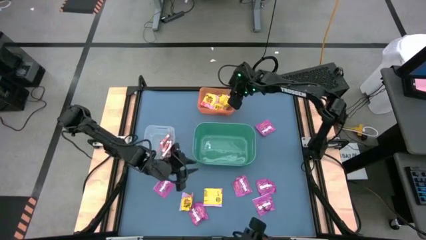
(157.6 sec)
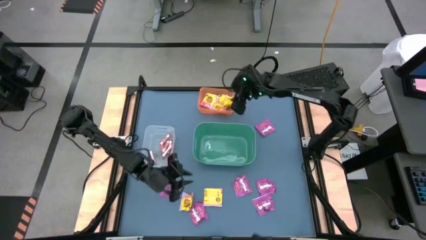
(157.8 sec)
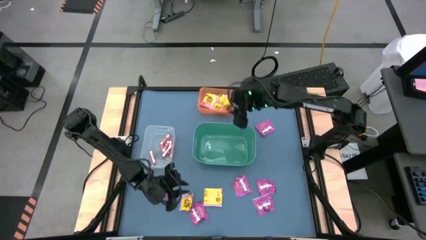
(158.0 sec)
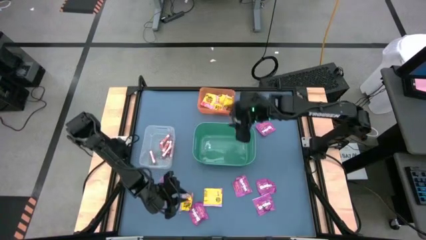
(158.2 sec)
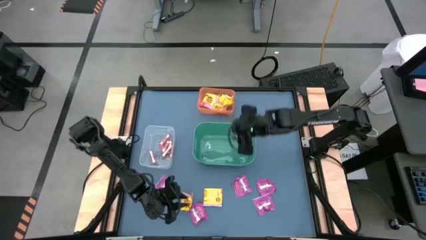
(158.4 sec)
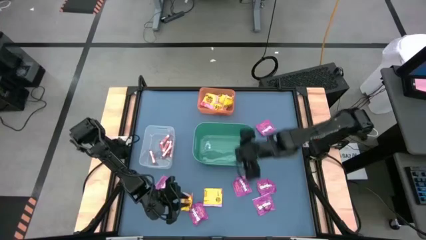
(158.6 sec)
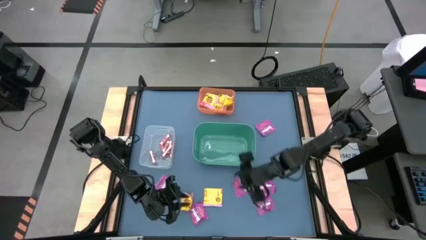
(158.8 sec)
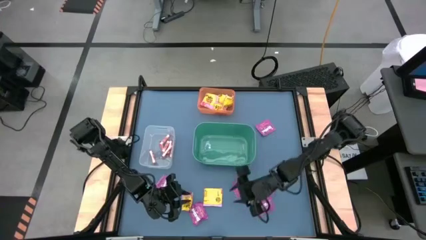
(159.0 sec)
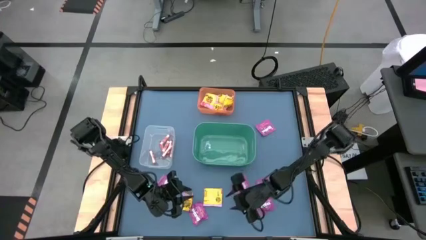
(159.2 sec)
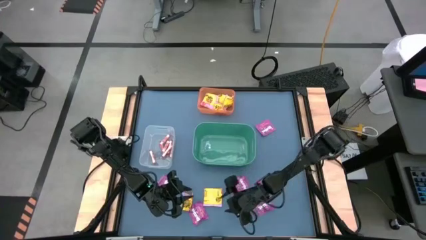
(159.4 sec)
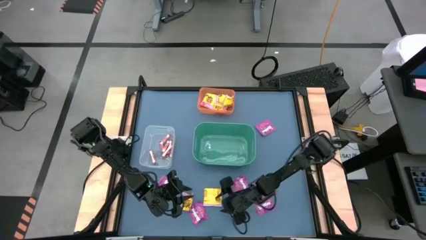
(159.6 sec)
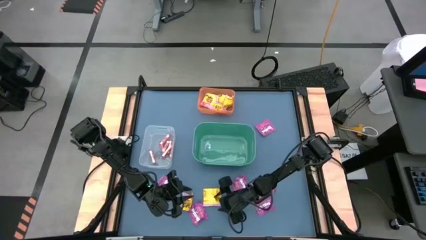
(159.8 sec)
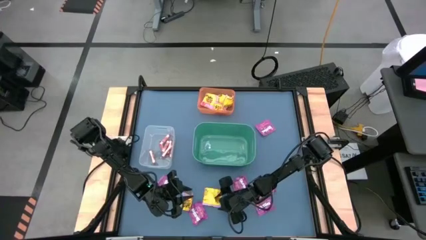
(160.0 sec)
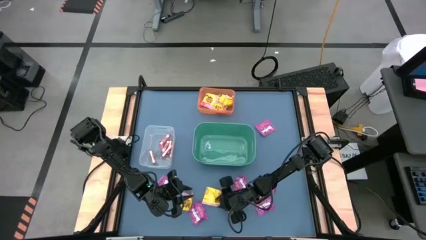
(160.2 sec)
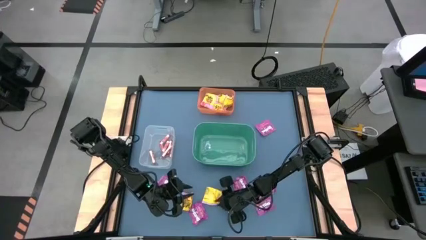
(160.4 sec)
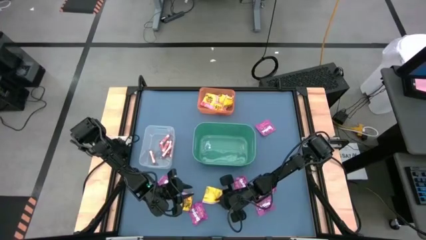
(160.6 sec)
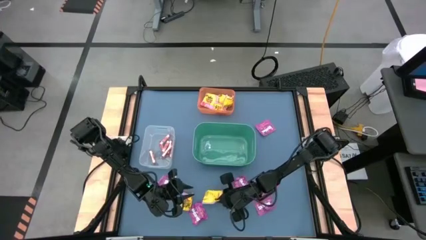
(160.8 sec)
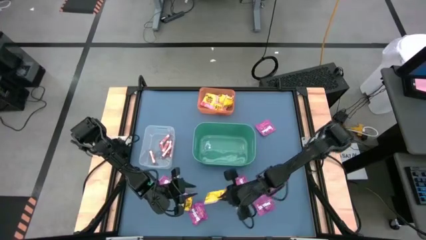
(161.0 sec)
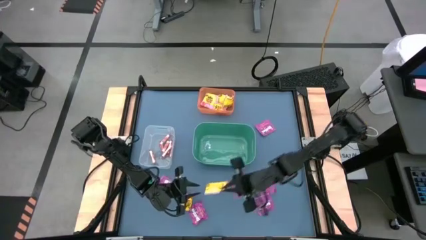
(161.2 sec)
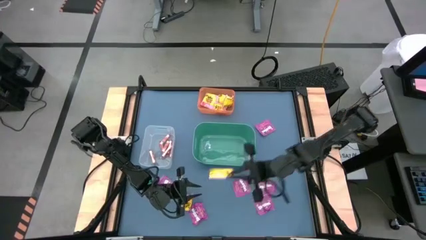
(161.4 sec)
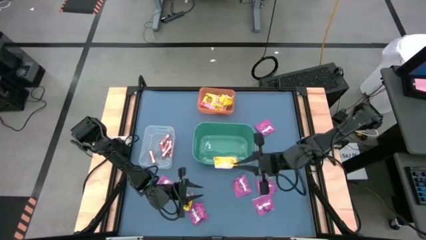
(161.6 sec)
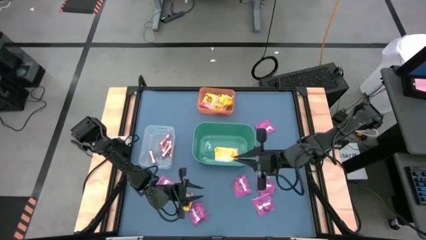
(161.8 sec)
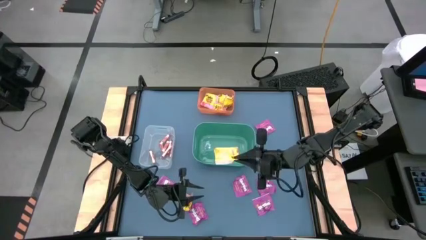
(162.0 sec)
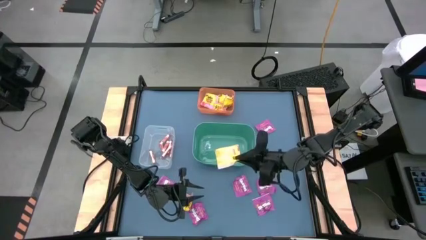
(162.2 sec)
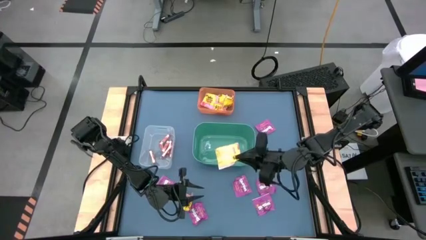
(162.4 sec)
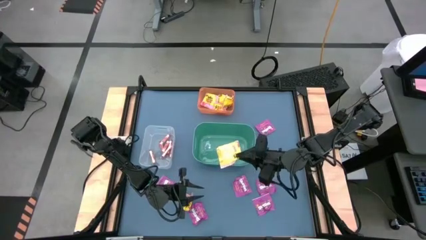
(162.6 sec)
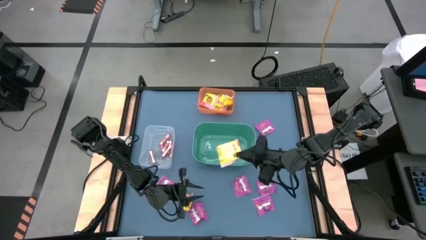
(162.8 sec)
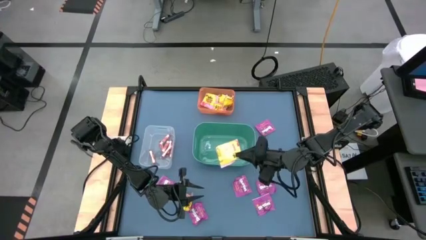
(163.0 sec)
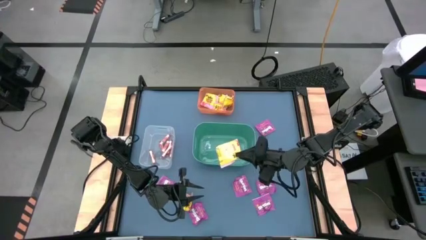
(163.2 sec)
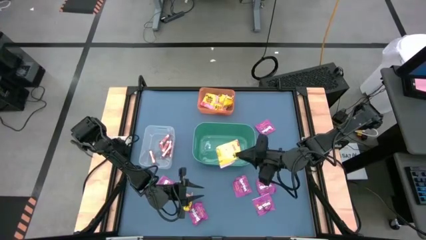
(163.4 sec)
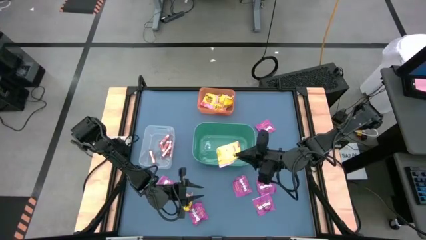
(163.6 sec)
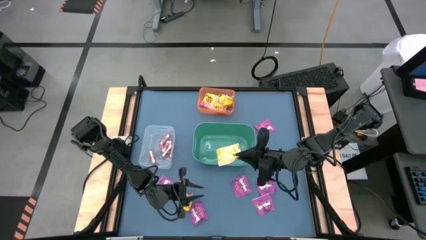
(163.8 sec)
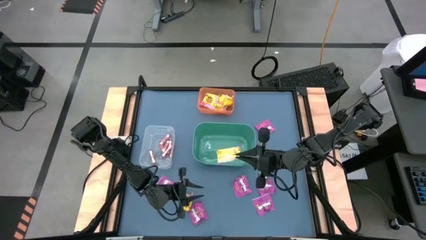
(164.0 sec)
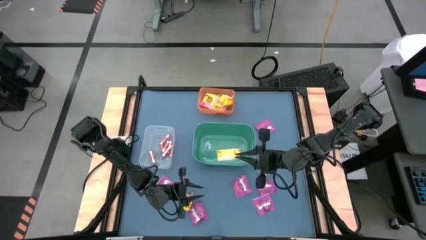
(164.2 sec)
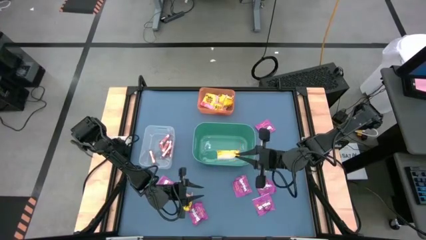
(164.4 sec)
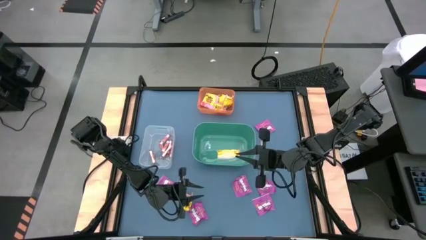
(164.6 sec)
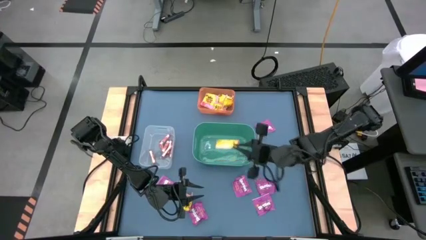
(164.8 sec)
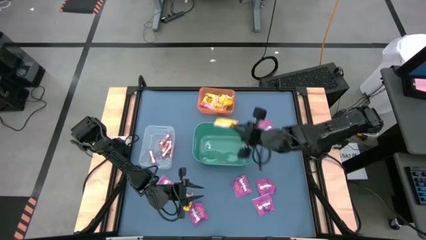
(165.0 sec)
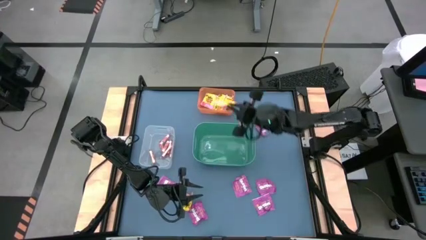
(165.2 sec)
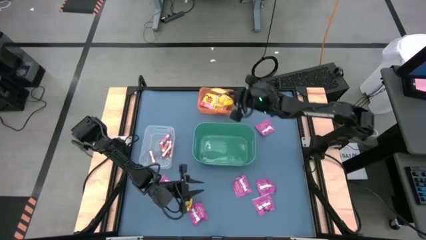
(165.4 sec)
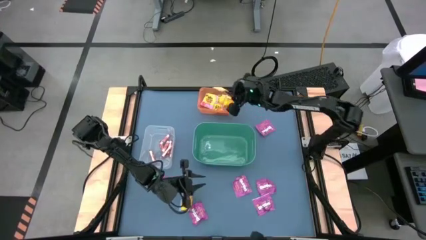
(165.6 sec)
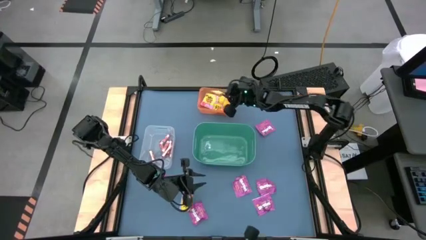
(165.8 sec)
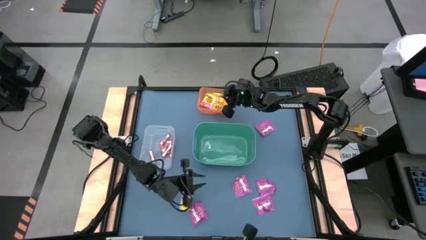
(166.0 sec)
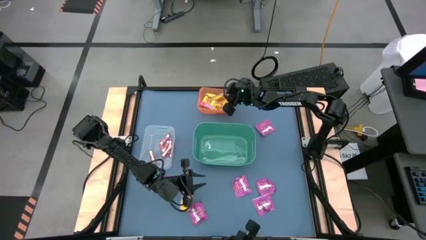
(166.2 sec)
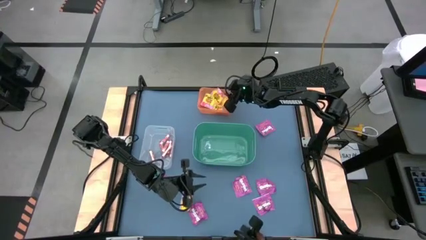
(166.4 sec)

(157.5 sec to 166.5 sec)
Task: Sort candy
Put the yellow candy into the orange bin

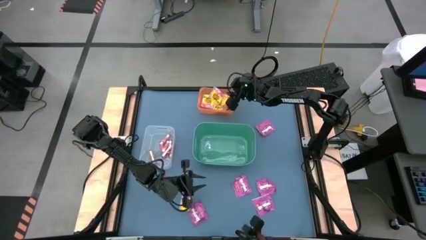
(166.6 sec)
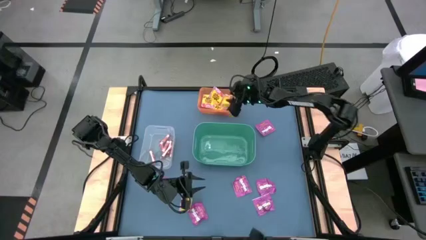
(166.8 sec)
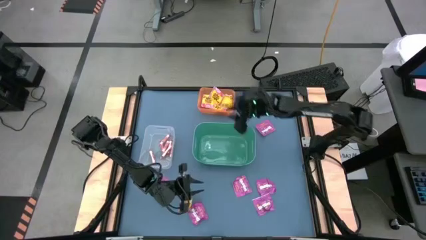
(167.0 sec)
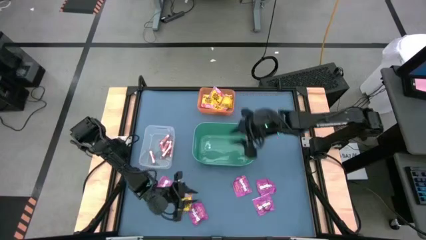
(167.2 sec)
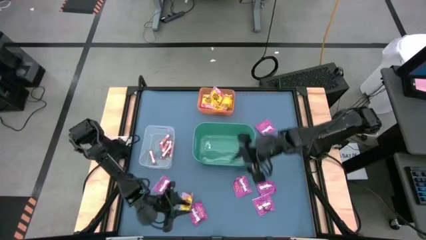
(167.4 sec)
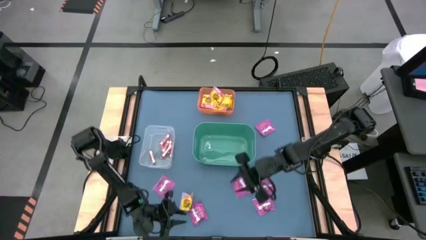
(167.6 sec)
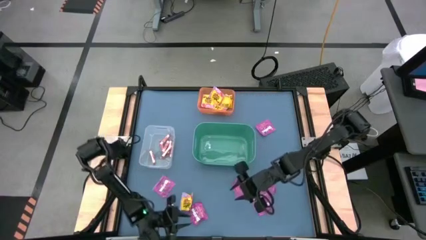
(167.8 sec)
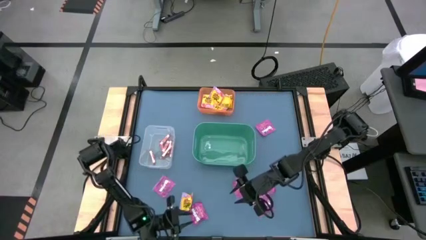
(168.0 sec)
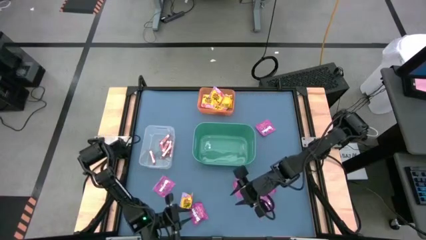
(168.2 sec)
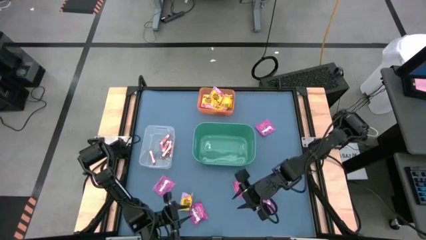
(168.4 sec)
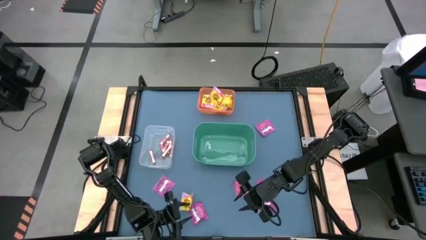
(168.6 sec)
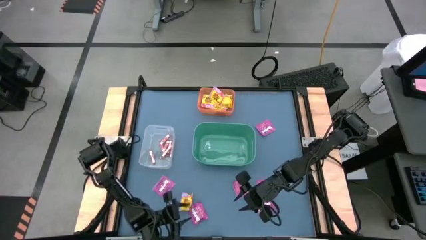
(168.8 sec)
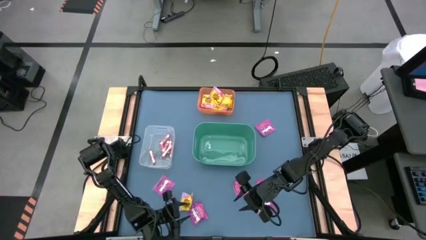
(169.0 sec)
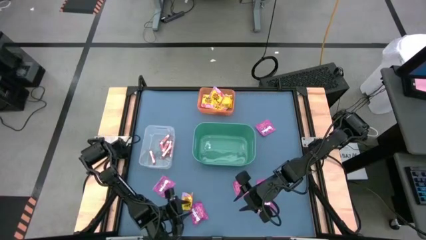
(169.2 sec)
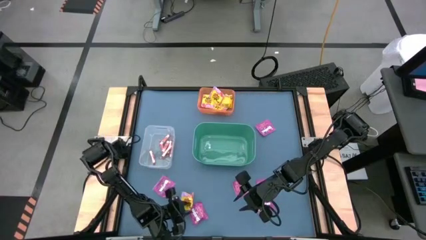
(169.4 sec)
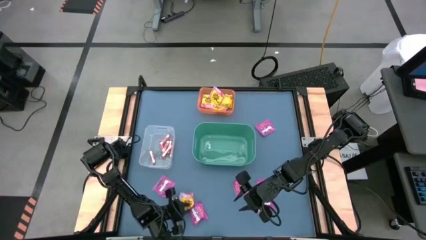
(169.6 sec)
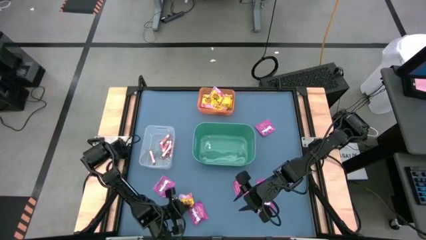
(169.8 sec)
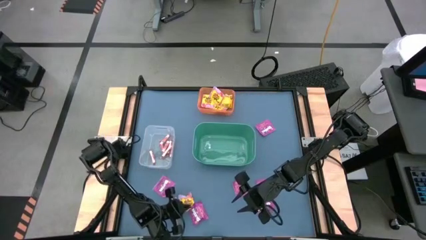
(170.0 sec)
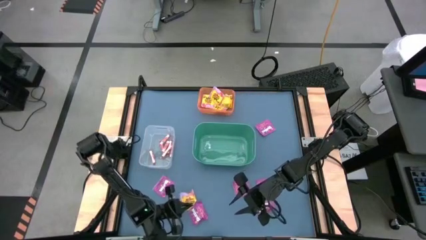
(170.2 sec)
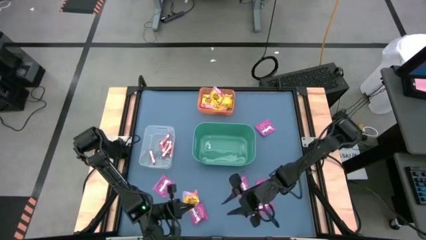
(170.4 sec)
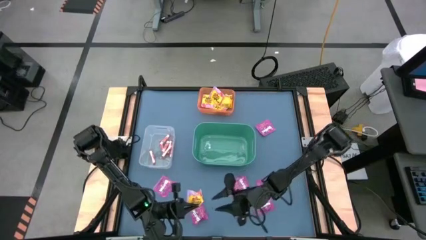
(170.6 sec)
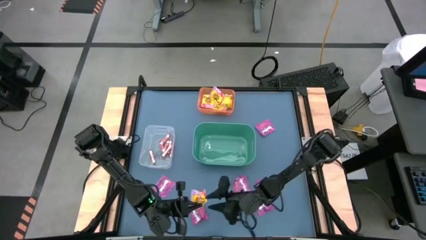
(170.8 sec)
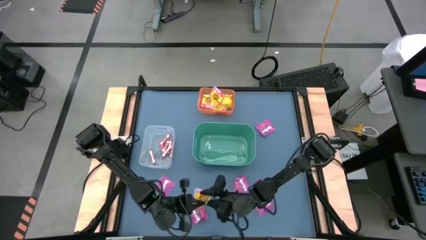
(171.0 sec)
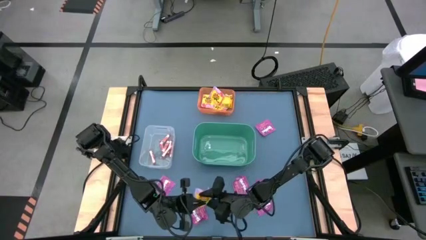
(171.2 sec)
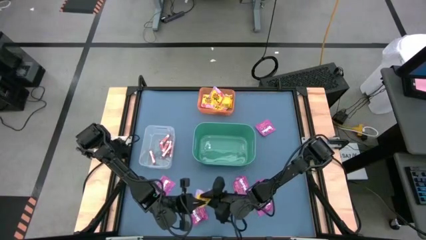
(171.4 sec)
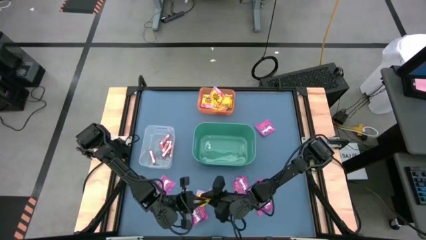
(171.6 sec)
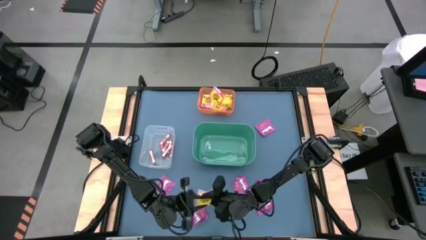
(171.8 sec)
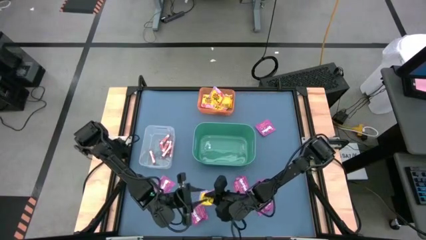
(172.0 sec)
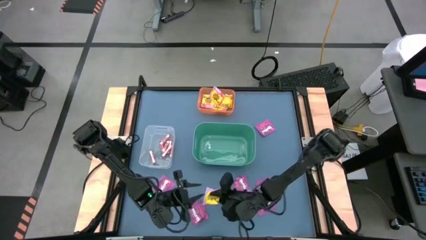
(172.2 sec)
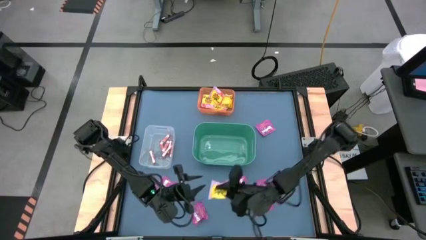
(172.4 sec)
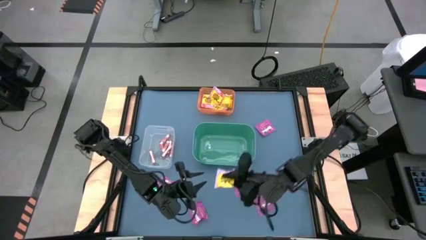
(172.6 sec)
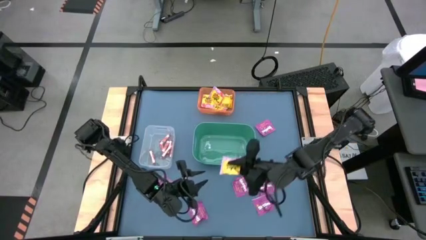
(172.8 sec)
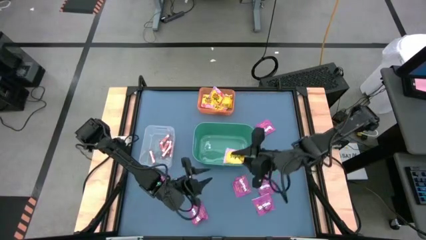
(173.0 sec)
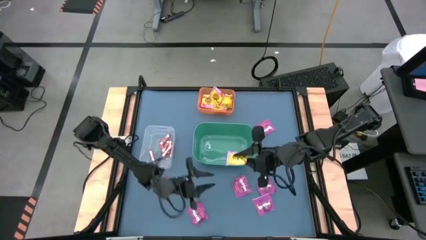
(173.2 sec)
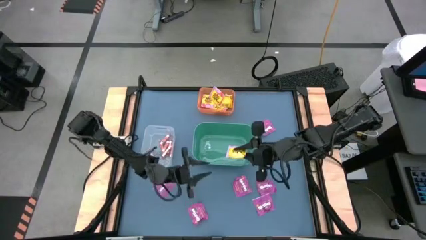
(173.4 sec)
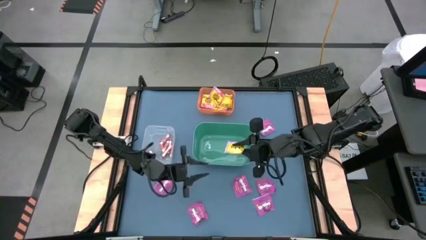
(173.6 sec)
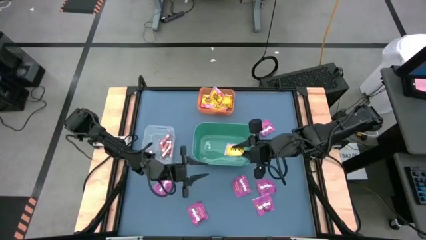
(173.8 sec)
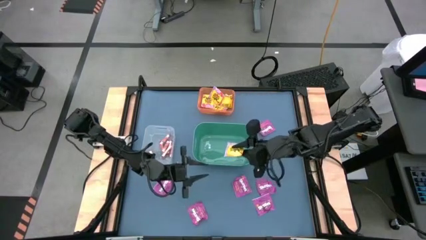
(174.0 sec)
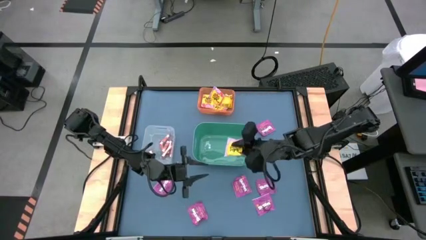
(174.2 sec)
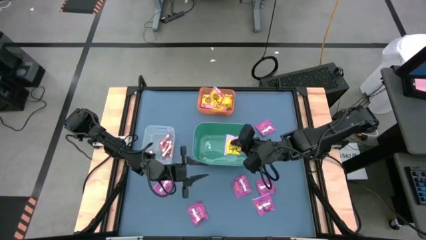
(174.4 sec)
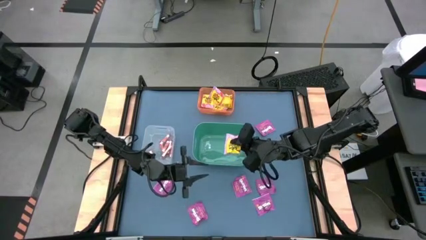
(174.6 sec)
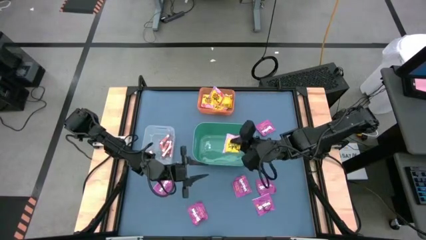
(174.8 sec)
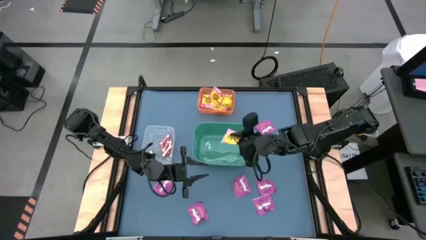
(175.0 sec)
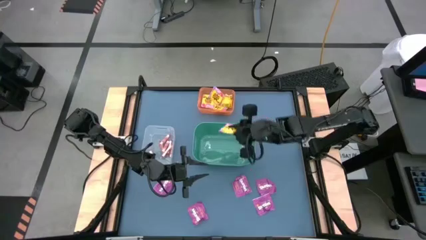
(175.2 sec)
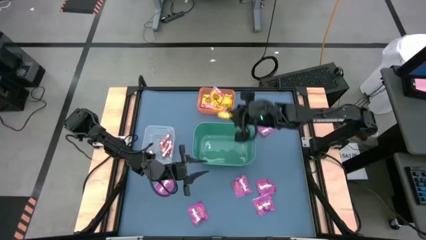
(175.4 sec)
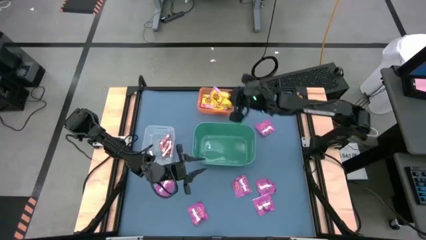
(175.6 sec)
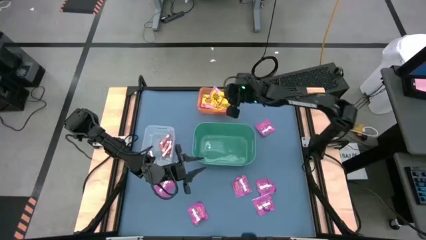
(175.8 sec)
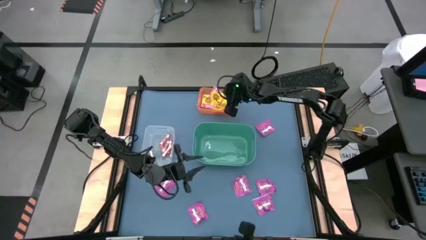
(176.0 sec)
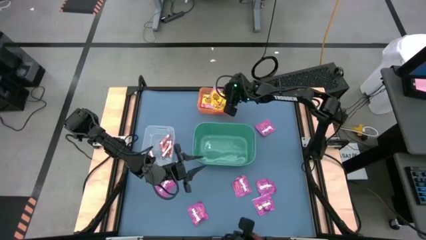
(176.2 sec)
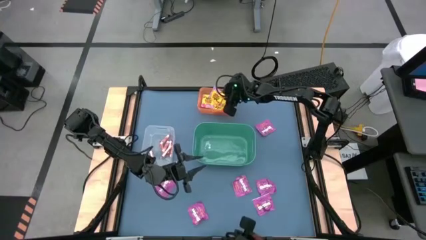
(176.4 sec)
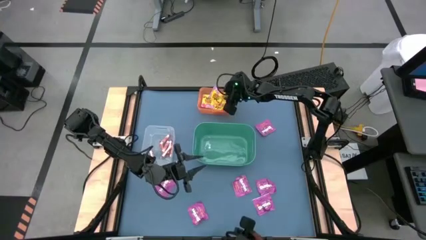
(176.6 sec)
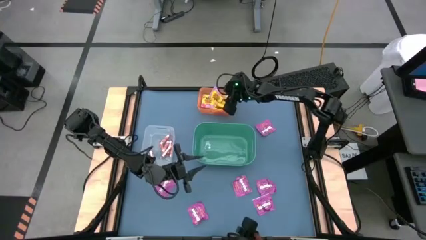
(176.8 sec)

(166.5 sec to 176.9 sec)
Put the yellow candy into the orange bin
